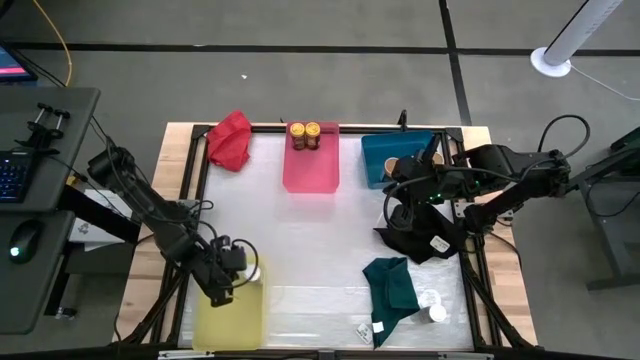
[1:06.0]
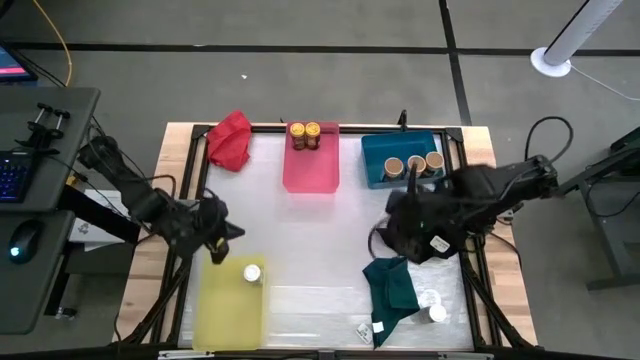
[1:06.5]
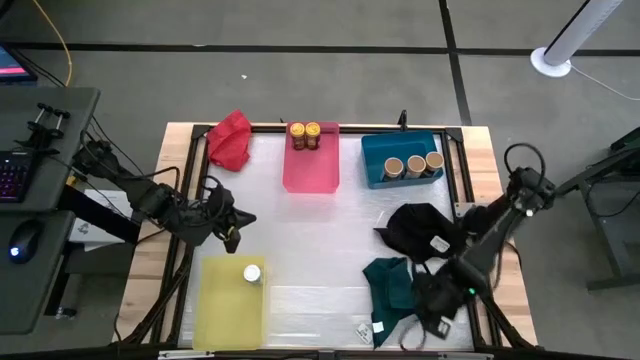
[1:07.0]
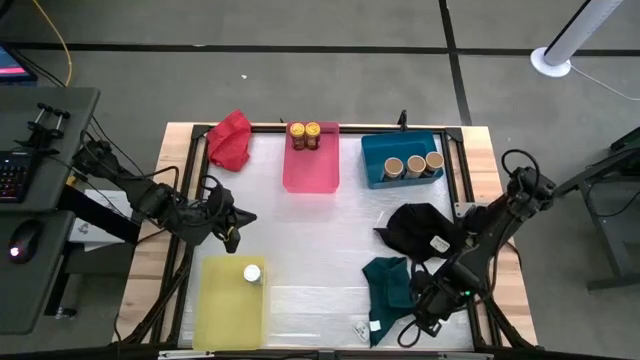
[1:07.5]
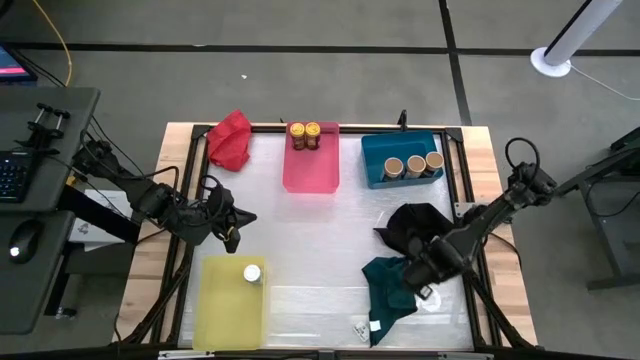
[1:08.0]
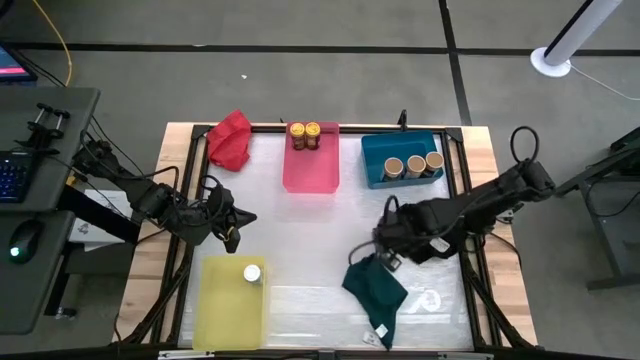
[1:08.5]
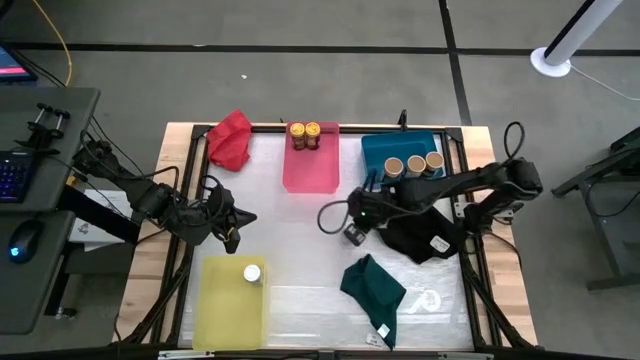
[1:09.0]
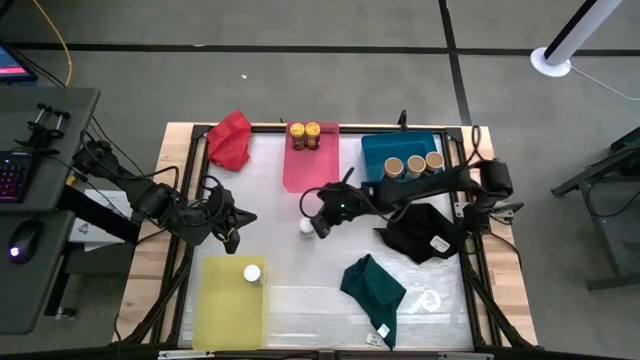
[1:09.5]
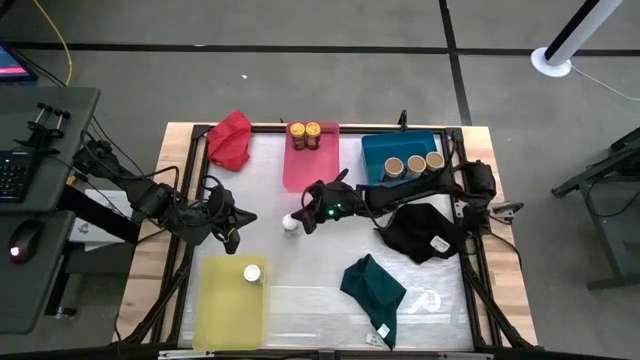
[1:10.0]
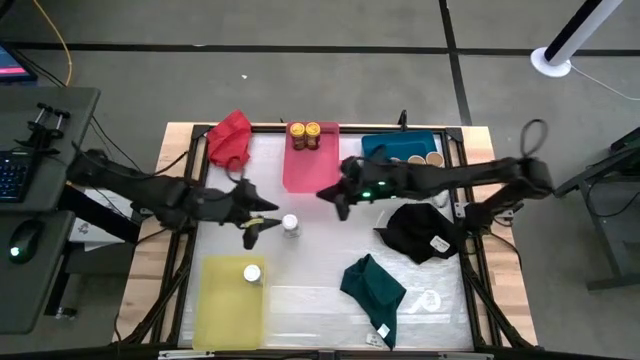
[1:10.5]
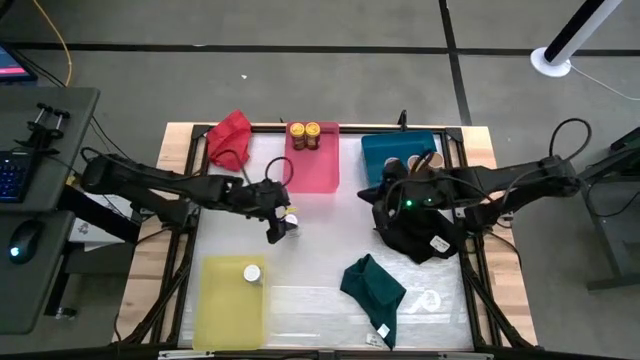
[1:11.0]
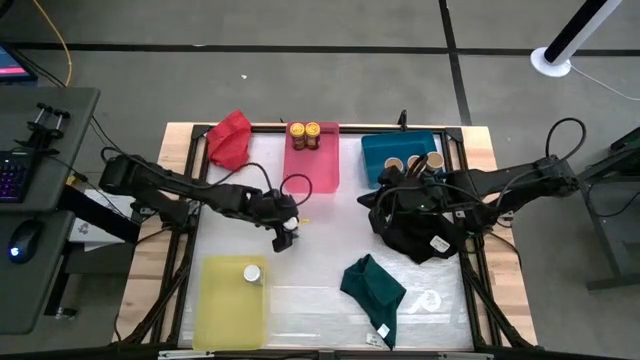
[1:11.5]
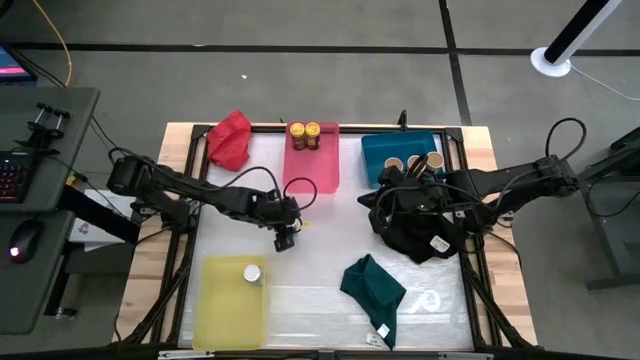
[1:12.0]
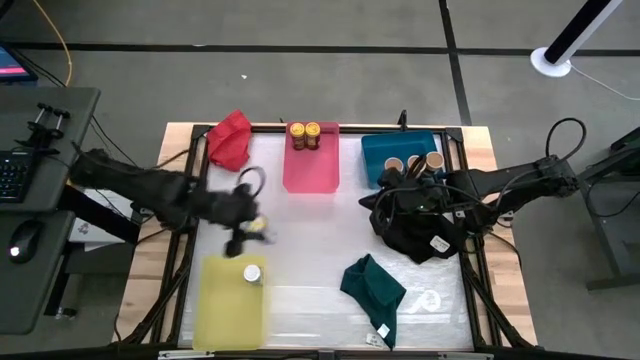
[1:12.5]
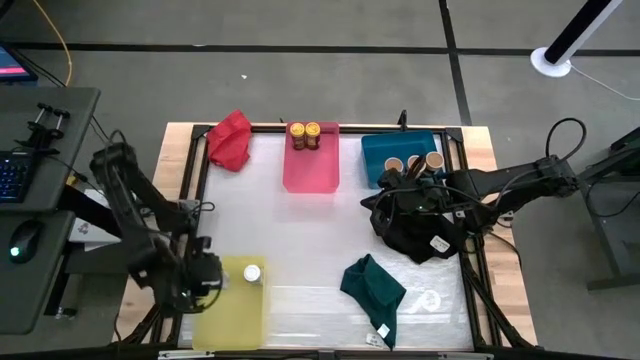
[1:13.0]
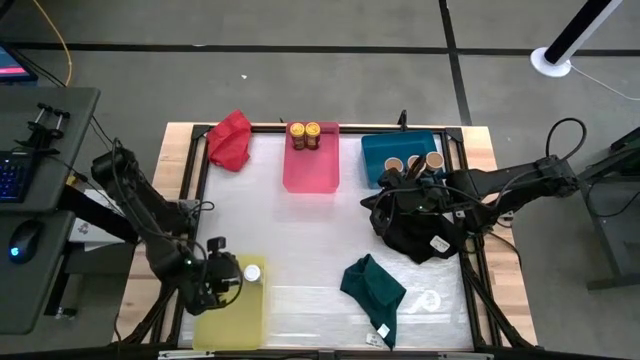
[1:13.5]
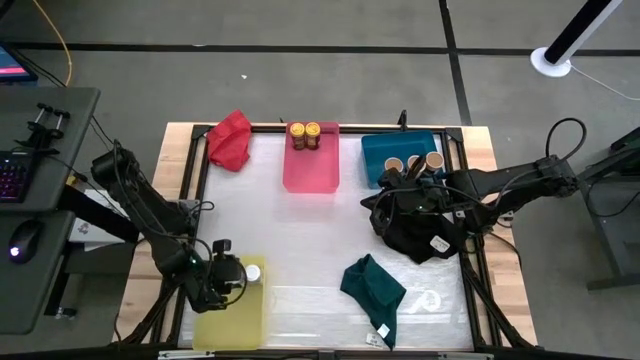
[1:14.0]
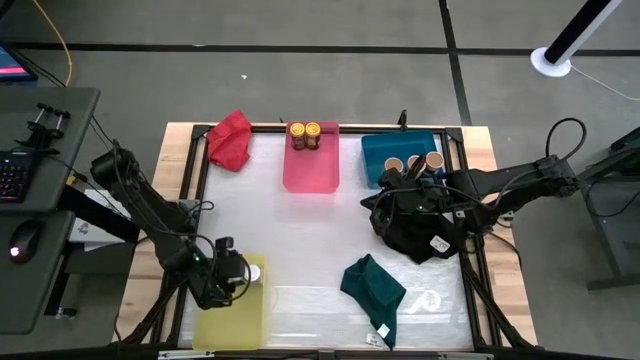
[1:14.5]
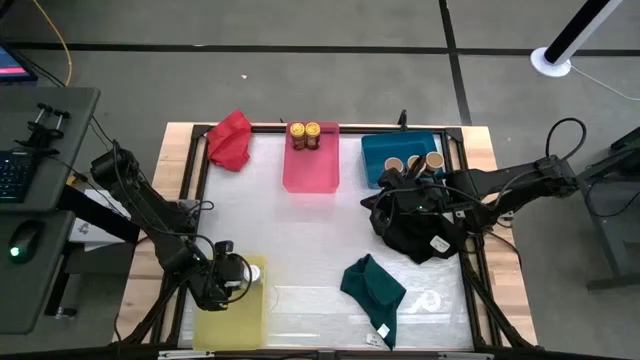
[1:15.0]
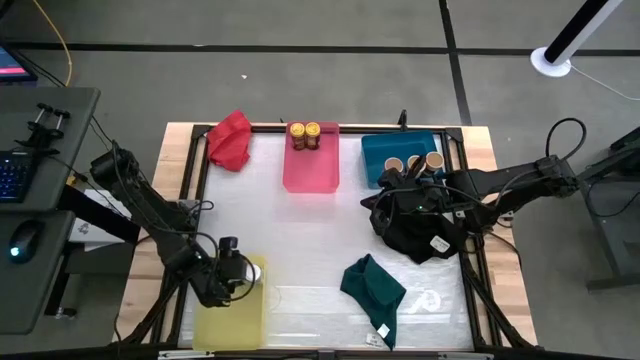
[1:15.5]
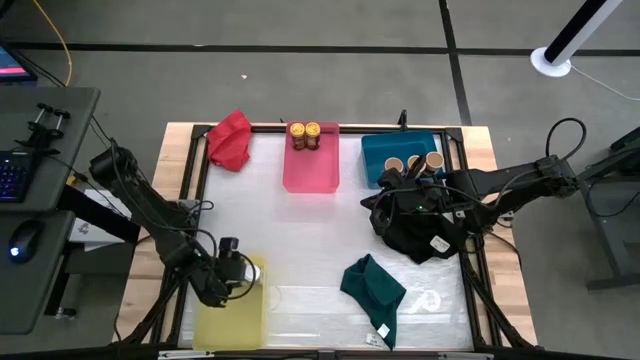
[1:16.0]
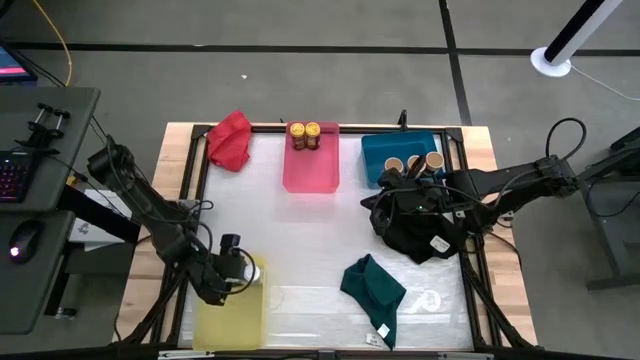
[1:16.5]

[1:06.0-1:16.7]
Task: Sort spices by type
Put the white seasoning bottle into the yellow bin

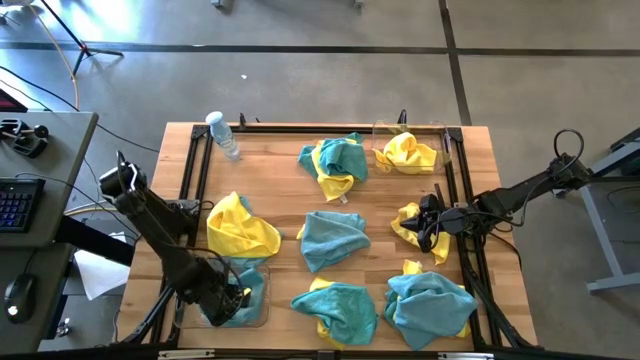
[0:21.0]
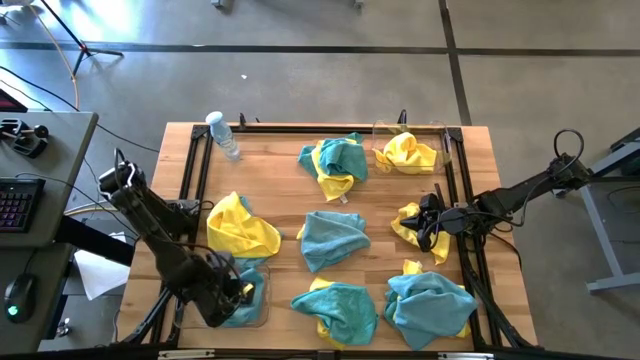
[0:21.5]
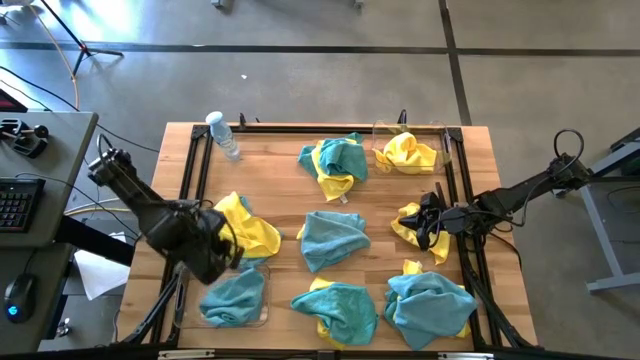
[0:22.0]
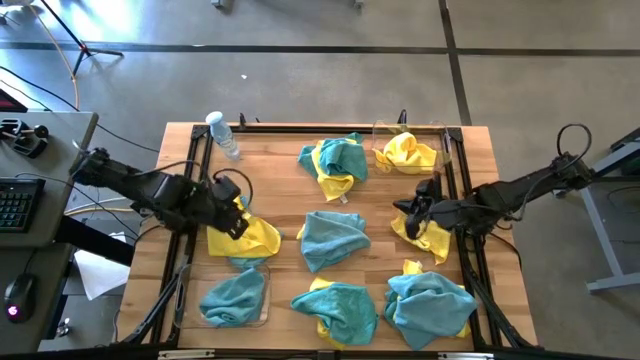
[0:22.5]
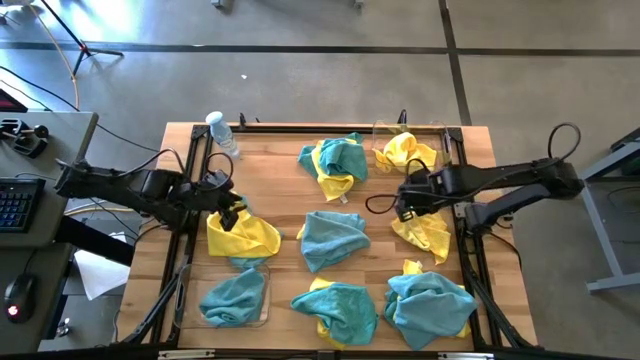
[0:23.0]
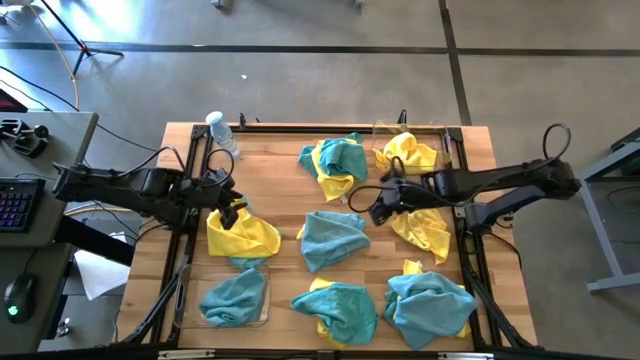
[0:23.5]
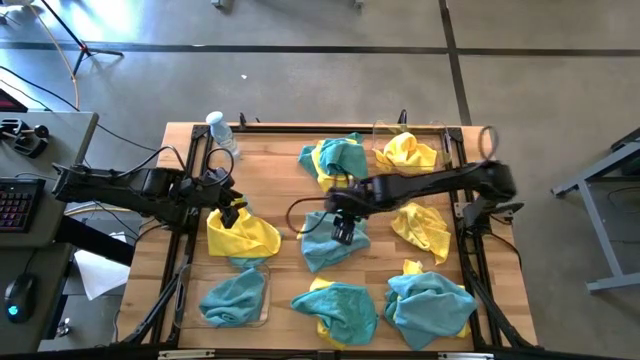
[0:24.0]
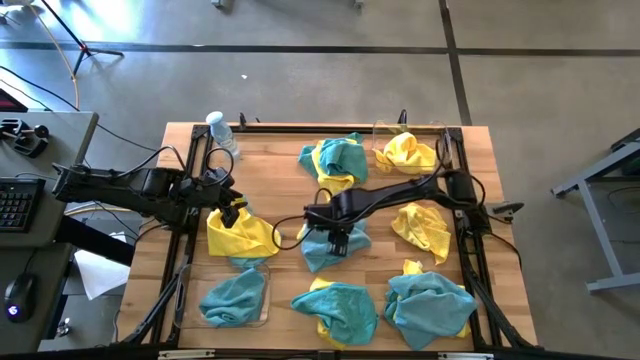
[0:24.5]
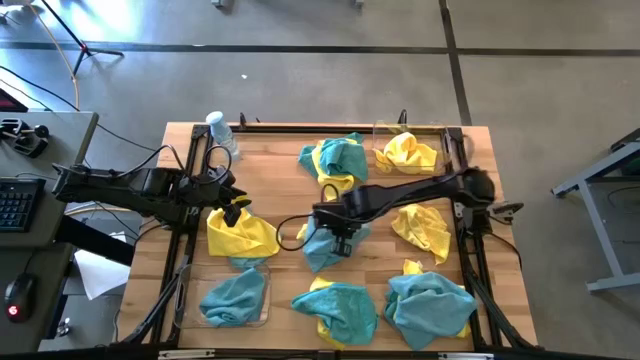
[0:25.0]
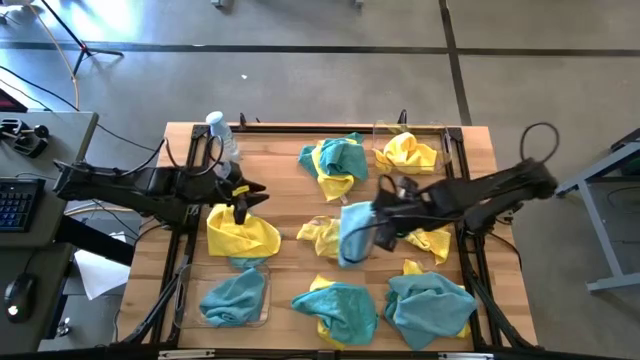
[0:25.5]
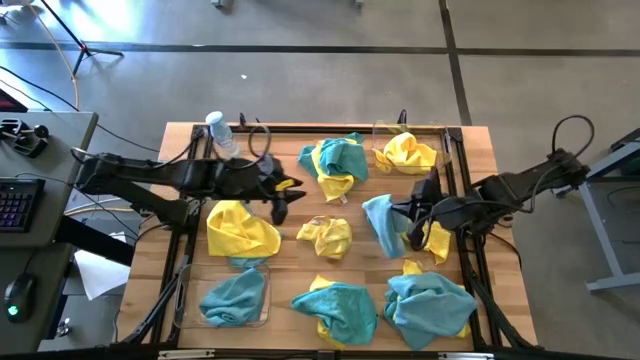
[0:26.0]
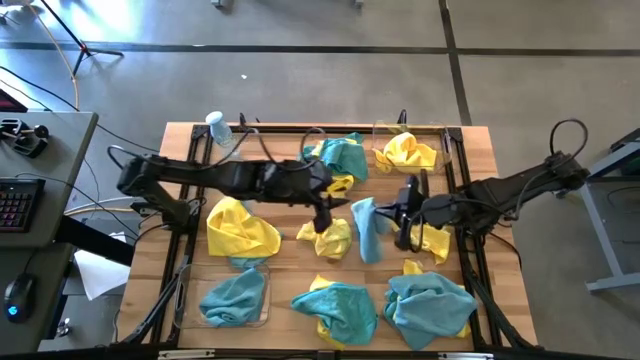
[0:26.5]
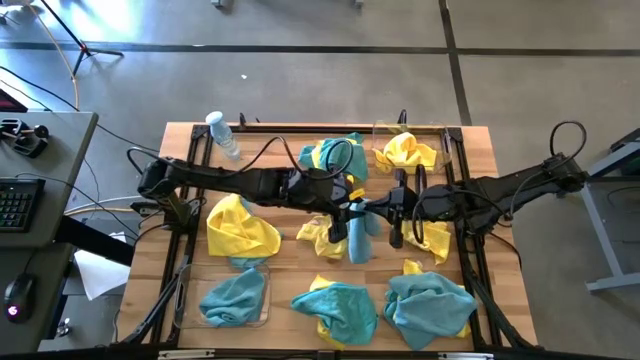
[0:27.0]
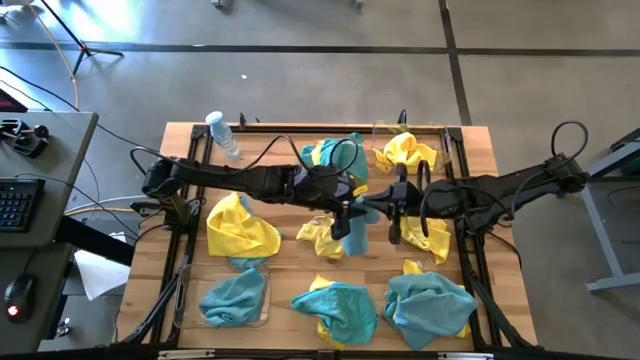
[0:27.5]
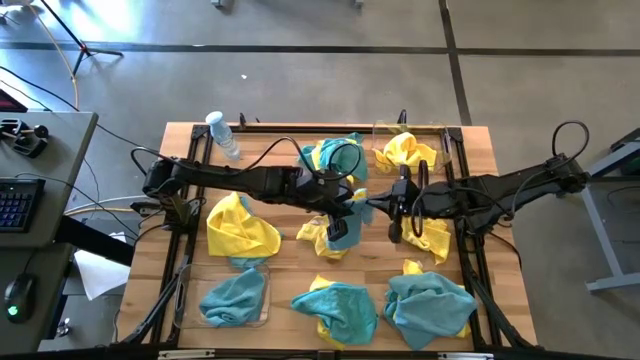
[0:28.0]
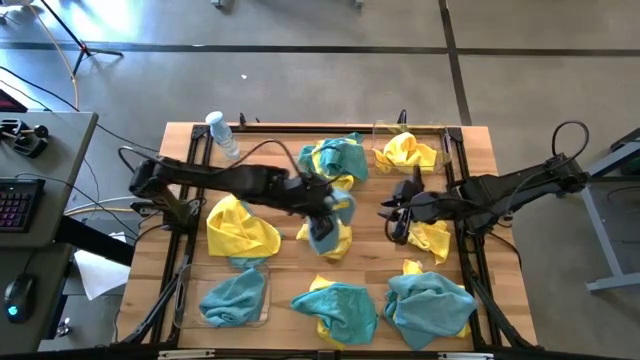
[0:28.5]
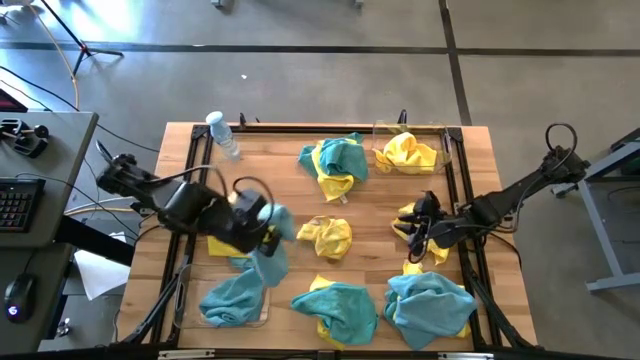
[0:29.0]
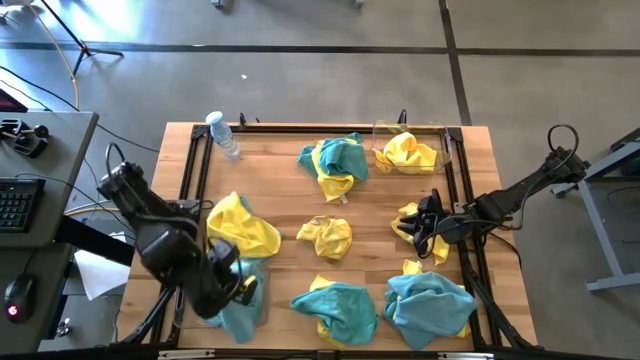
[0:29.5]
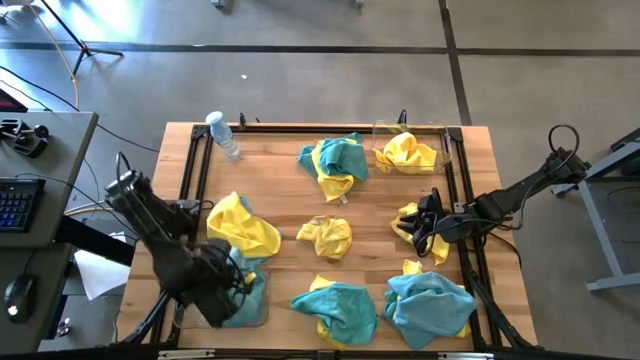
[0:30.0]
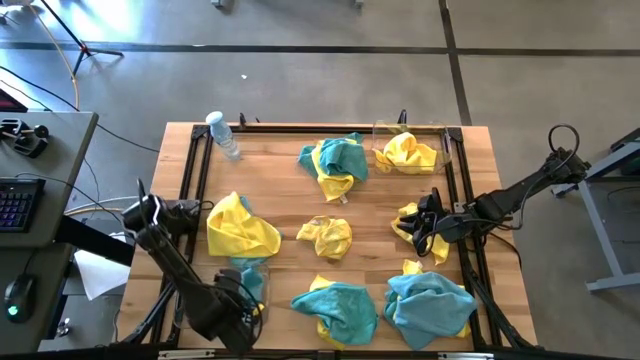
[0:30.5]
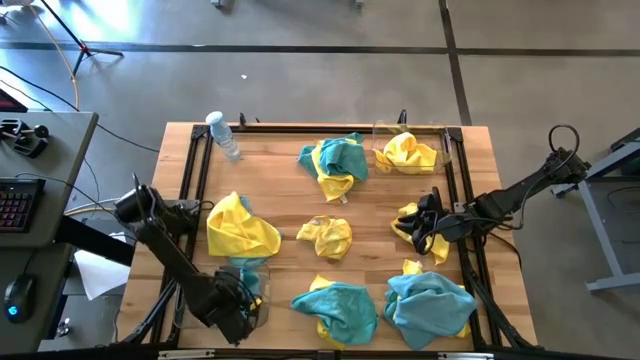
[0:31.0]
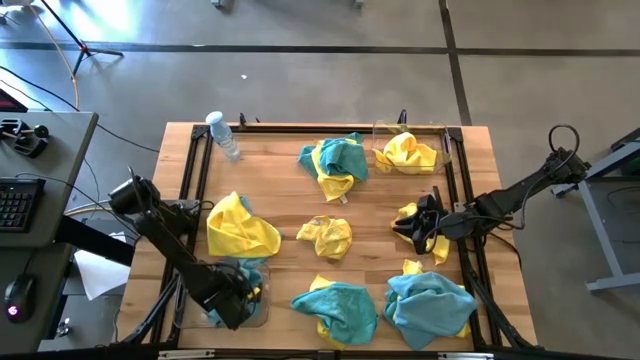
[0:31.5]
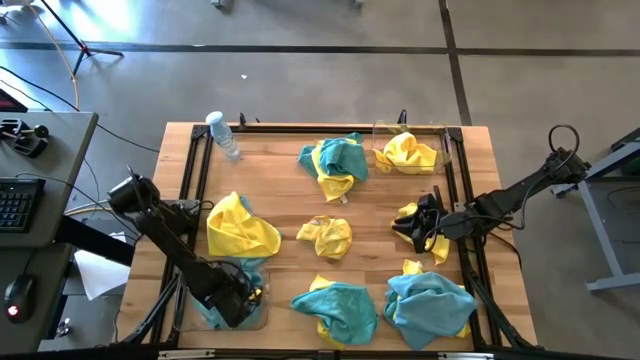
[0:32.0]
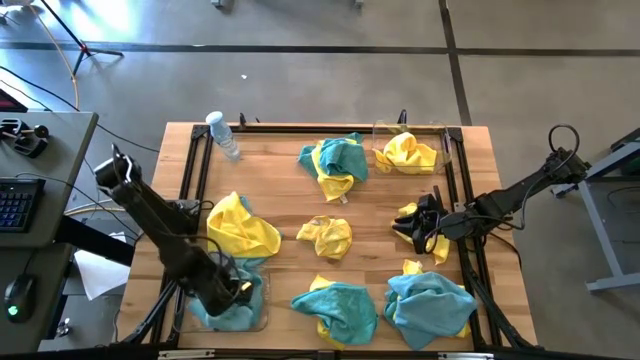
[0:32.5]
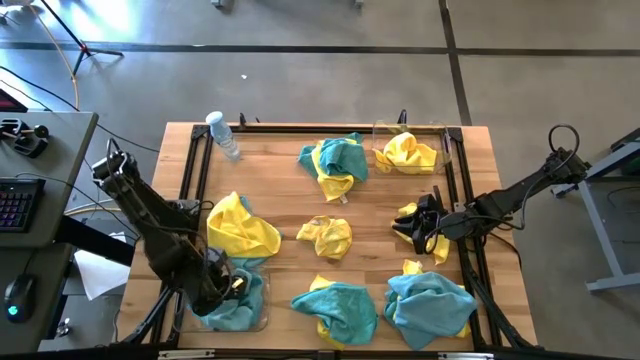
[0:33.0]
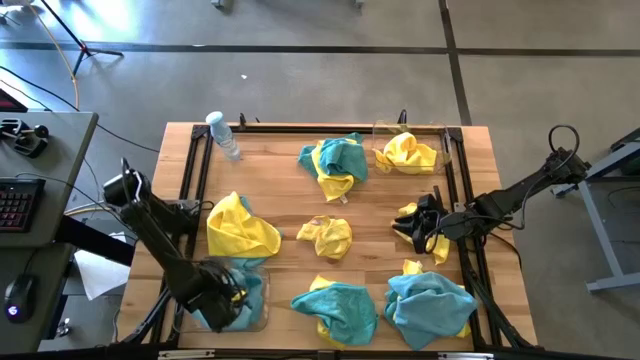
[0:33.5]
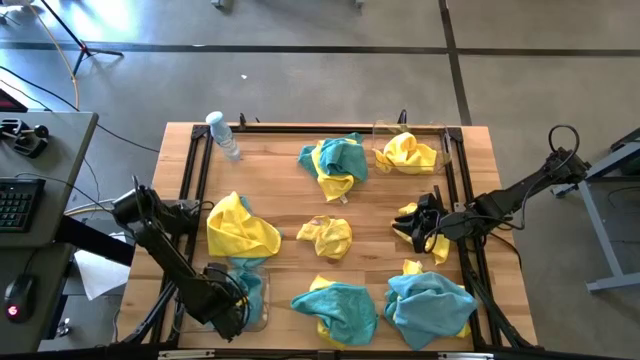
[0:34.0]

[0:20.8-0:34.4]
Task: Sort microfiber towel by color & place in baskets
Put the blue microfiber towel into the bottom transparent bin
